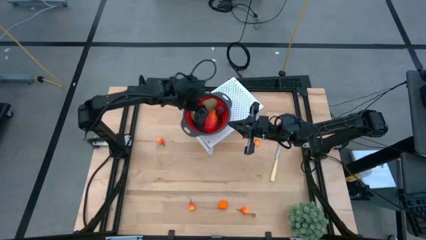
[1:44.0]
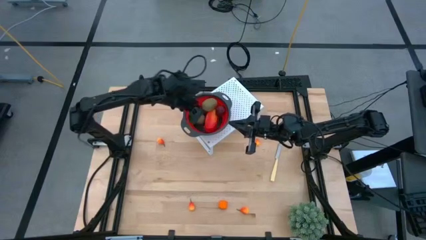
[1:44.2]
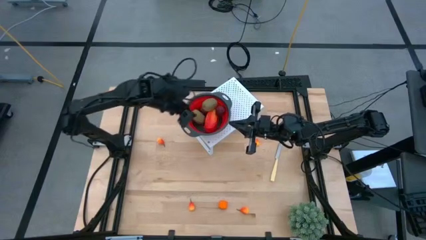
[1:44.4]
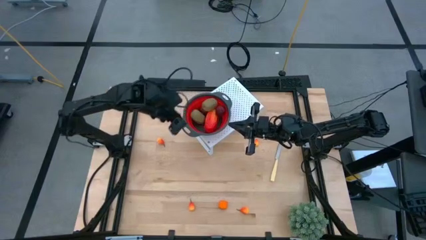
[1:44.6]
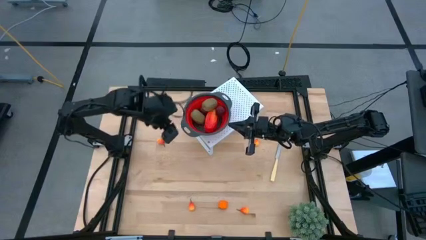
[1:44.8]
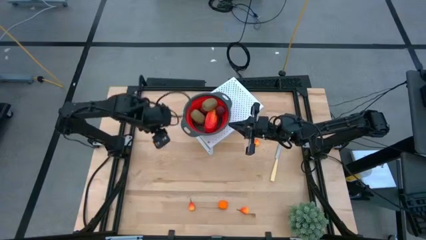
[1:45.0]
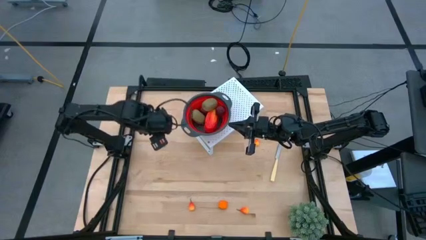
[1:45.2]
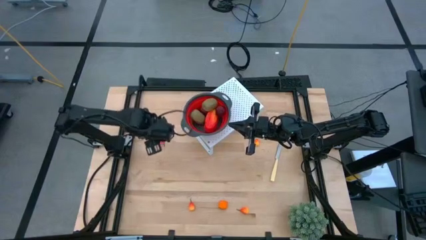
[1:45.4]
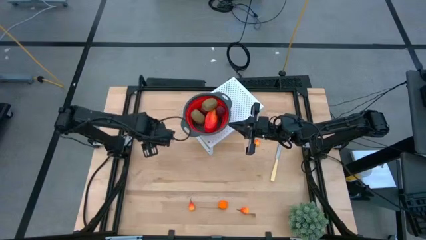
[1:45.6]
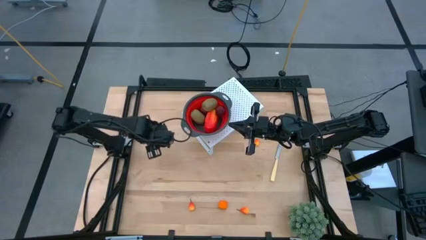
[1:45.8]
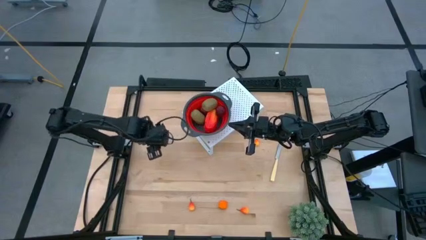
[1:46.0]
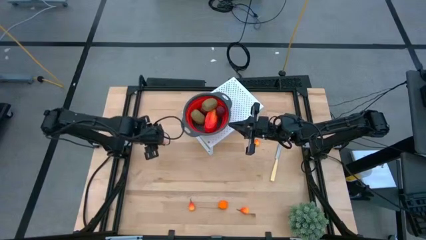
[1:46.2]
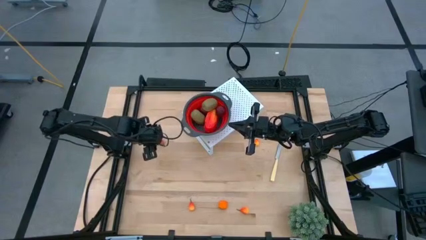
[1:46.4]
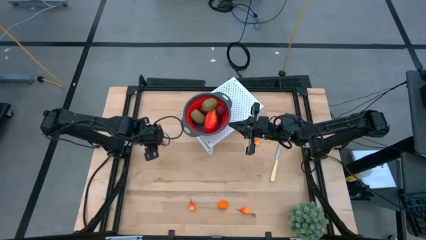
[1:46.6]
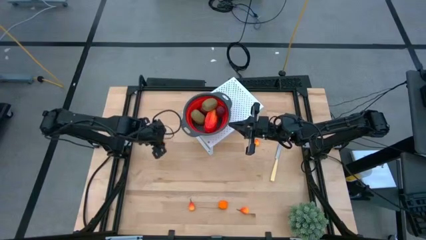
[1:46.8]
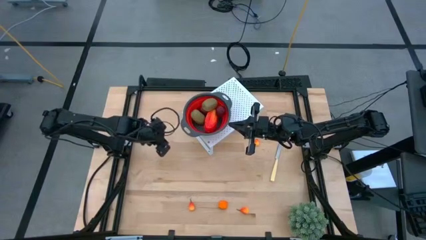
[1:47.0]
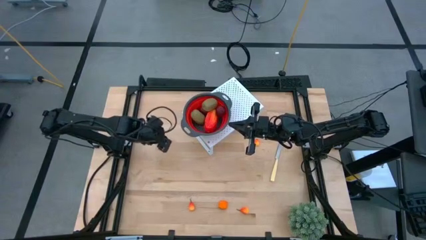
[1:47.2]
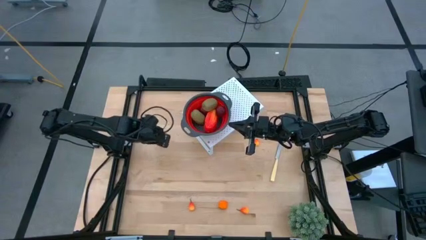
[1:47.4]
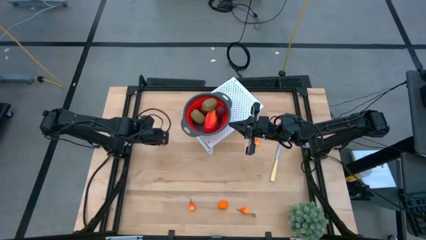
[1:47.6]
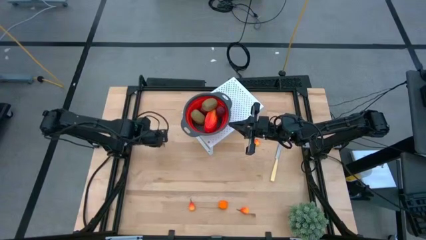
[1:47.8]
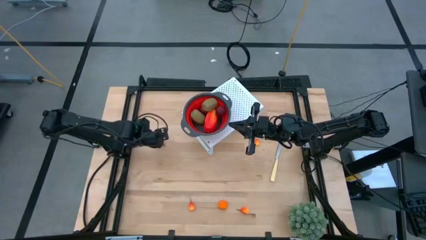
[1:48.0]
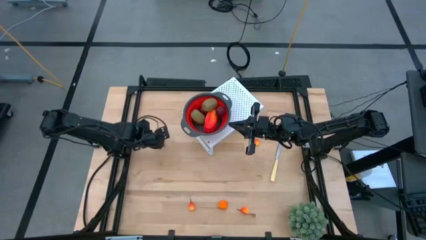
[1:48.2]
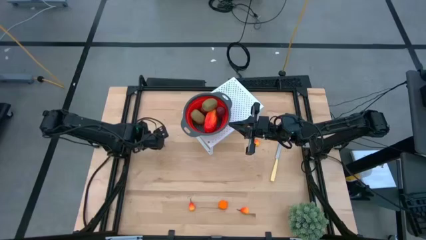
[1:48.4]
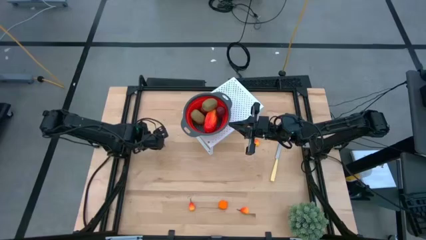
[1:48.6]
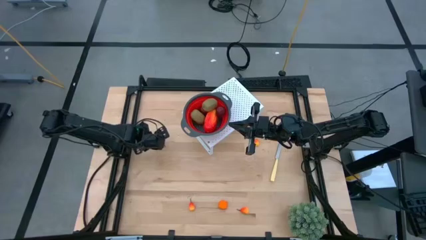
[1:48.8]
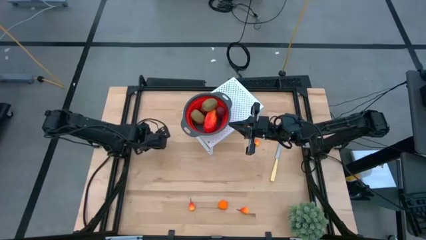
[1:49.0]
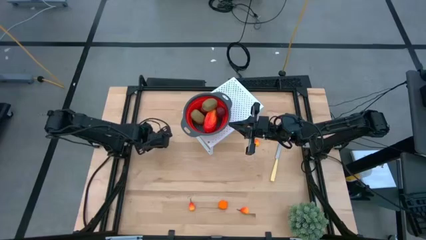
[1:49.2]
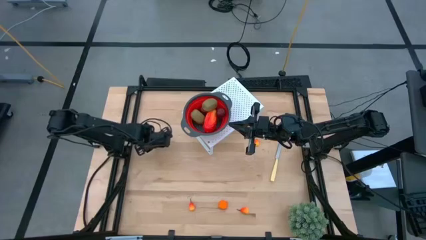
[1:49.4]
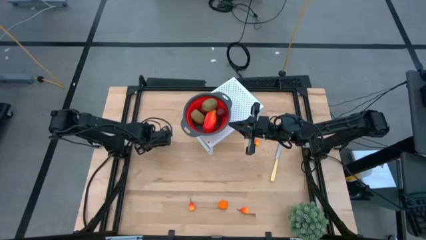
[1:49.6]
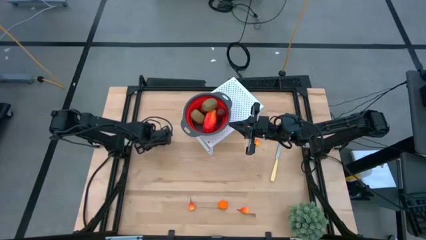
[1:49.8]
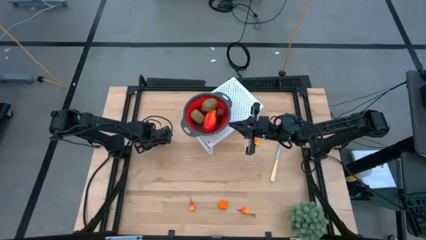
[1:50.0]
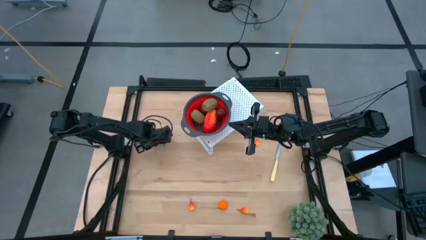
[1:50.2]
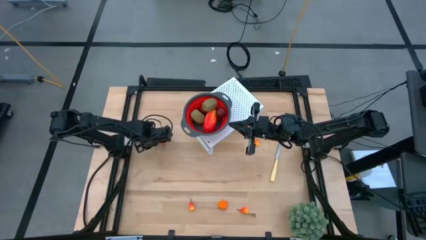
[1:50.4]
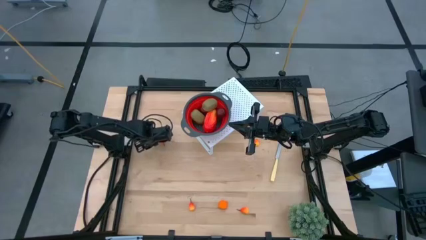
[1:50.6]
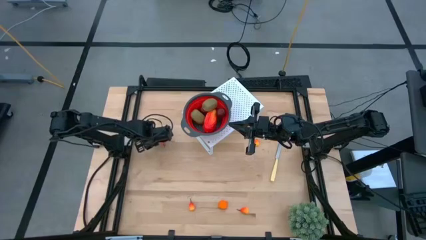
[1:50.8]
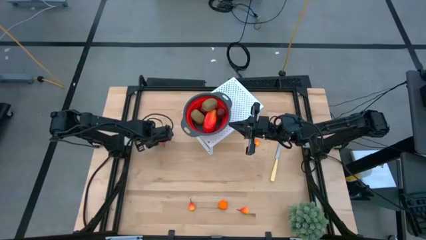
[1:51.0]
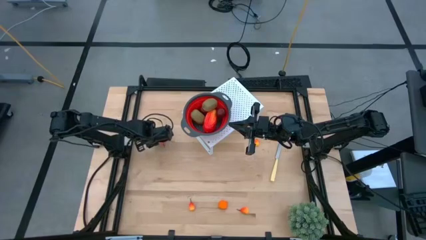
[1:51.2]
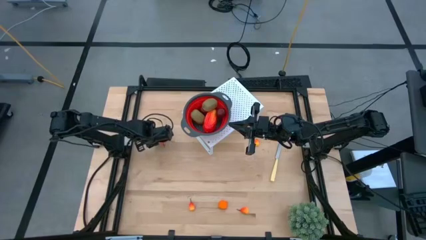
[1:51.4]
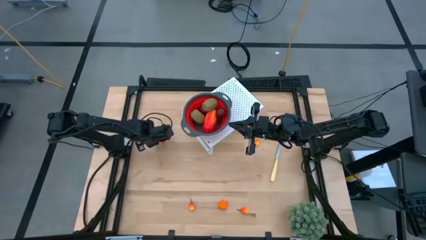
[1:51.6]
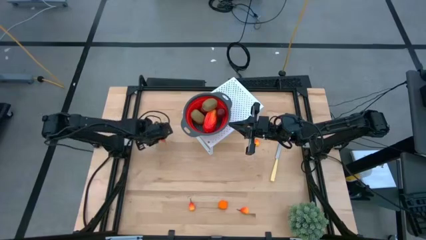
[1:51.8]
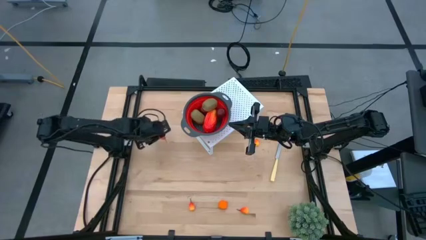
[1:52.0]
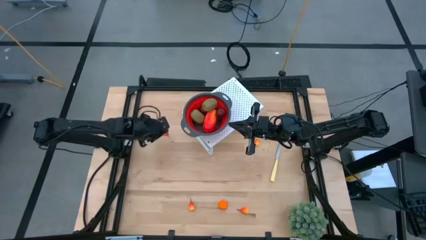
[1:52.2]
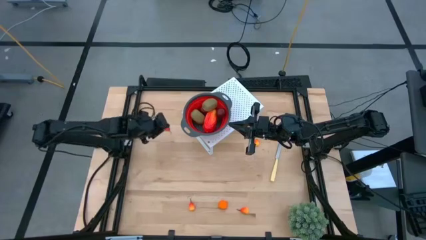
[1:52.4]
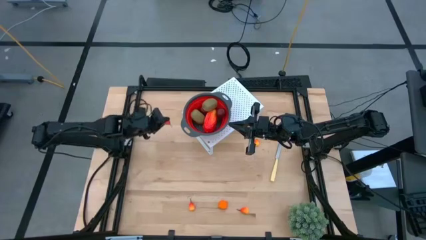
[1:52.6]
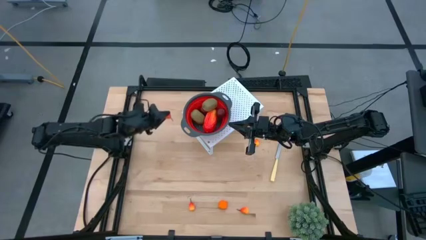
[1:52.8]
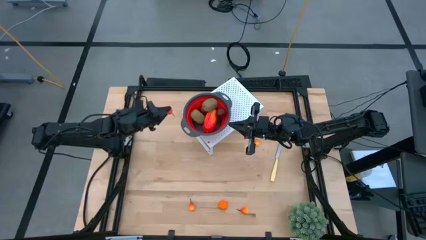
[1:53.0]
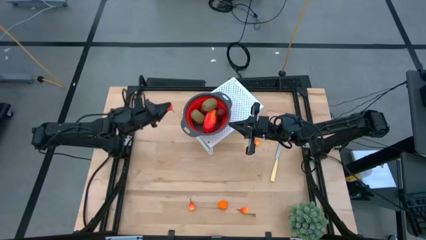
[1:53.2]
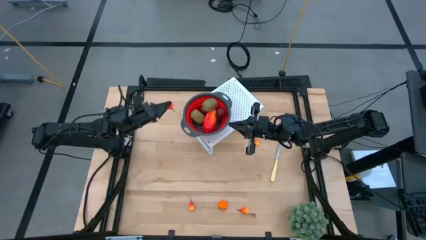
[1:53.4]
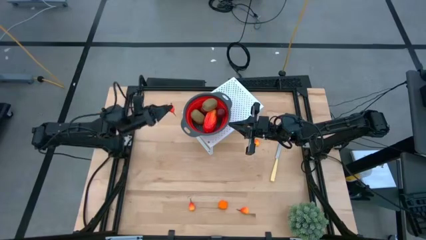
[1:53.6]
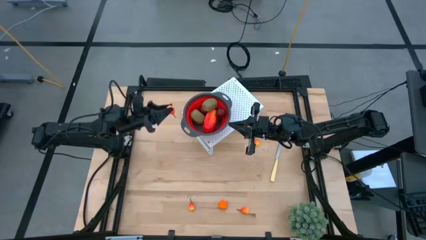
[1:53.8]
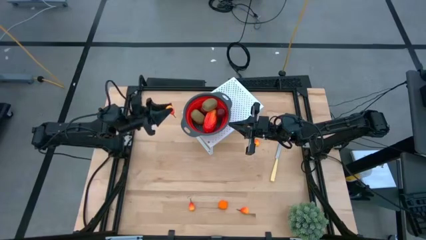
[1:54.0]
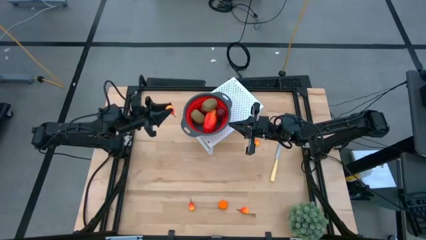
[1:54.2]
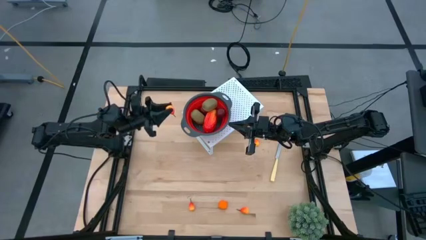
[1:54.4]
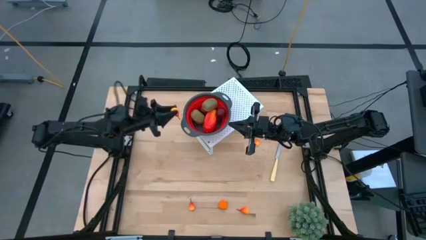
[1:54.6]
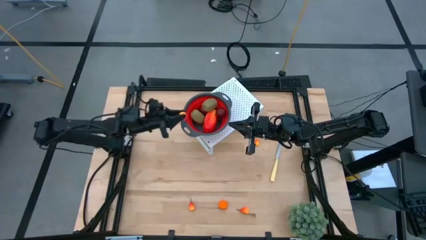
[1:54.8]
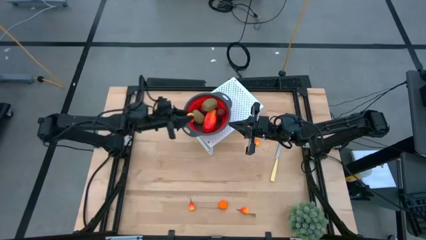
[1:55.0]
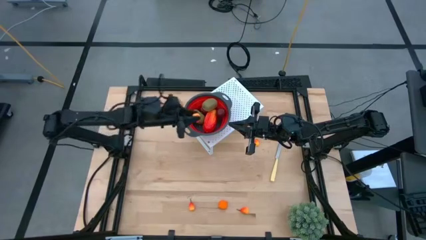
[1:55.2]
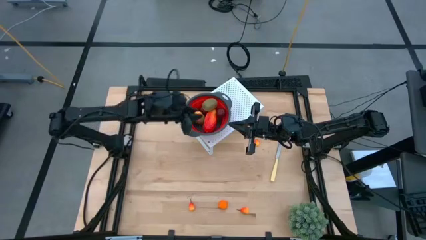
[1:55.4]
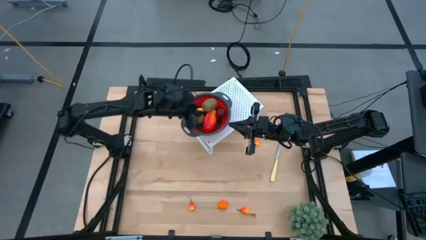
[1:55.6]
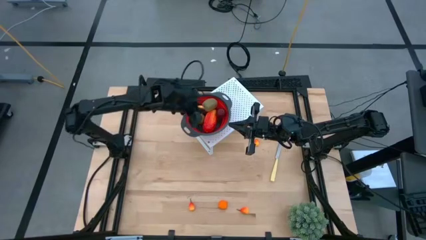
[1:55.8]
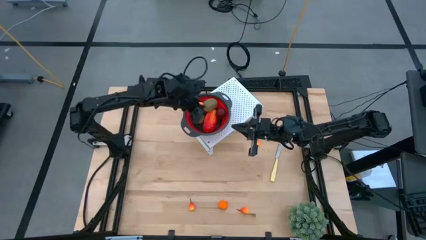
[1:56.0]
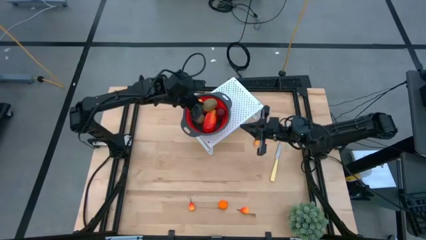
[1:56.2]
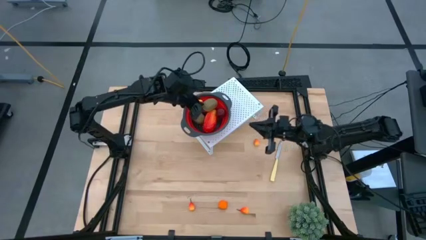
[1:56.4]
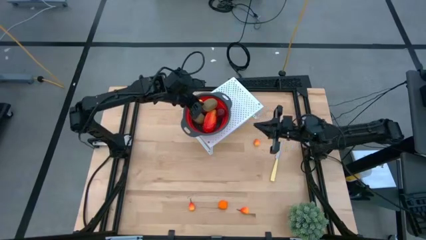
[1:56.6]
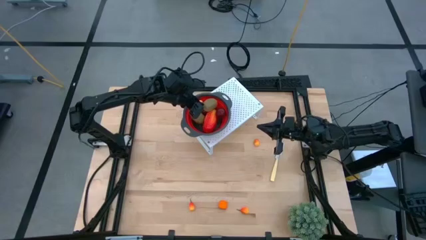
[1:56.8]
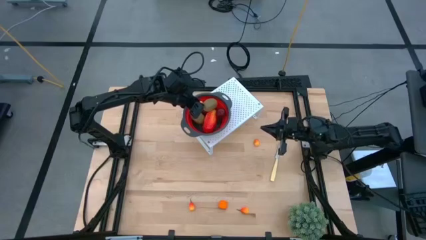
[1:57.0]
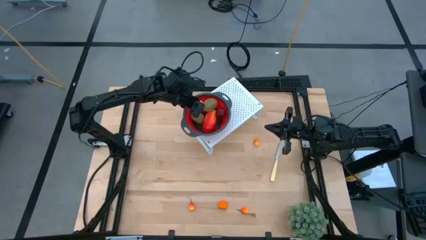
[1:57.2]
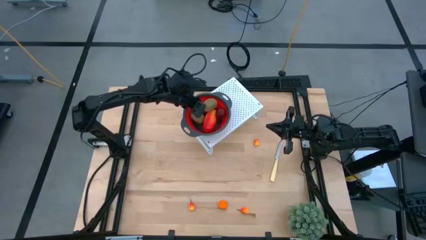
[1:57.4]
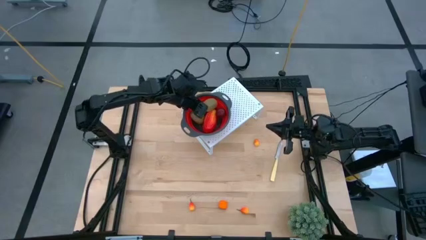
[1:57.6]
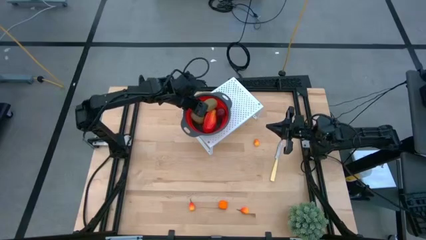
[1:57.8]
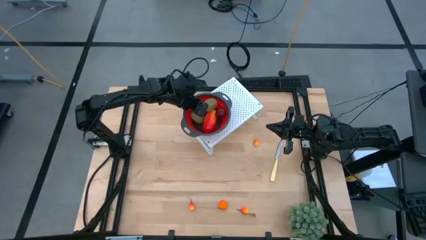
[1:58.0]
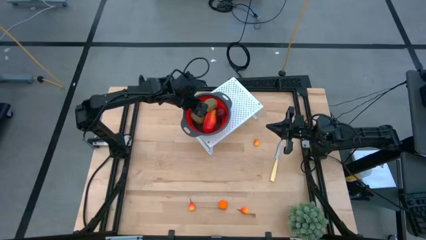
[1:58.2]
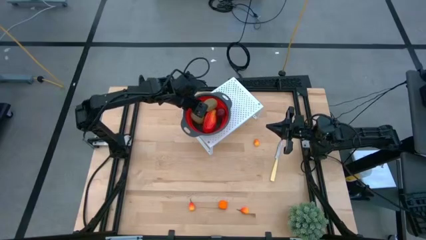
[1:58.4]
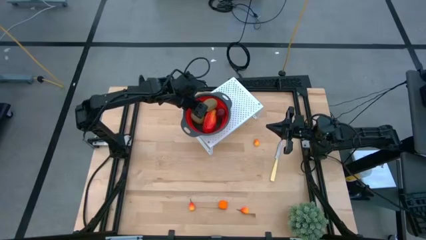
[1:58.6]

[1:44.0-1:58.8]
Task: Pick & Place Fruit
Put the top left peach into the red strainer bowl on the shelf

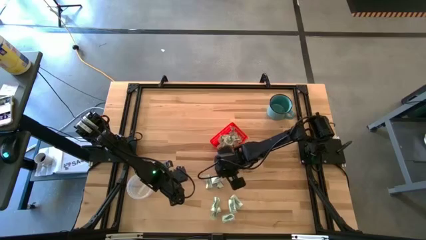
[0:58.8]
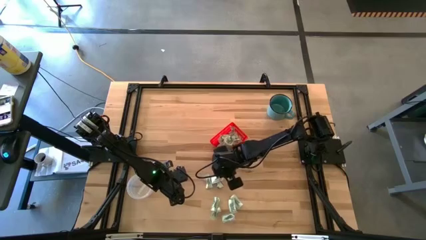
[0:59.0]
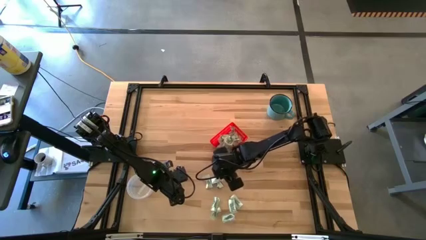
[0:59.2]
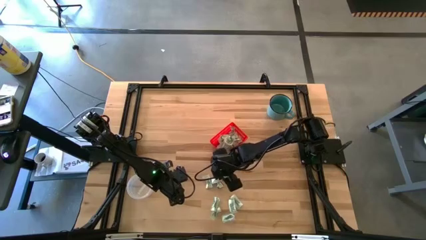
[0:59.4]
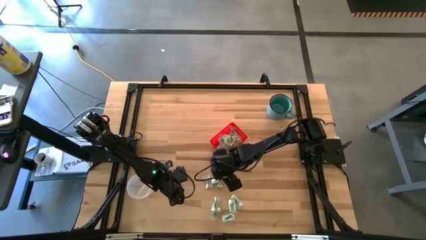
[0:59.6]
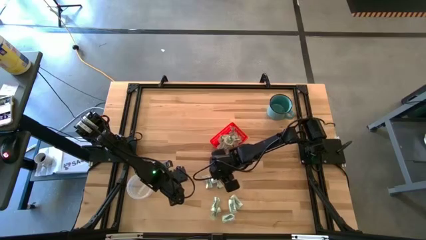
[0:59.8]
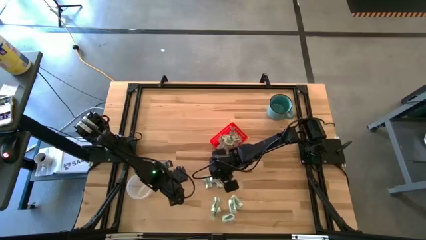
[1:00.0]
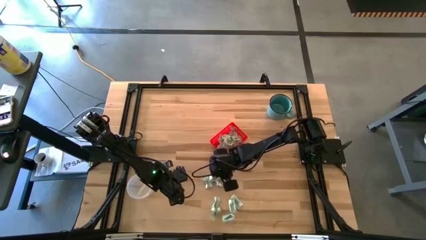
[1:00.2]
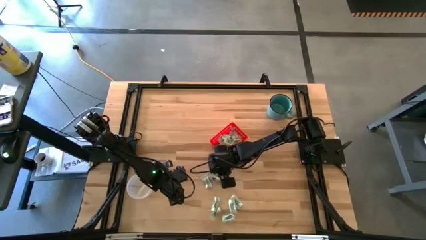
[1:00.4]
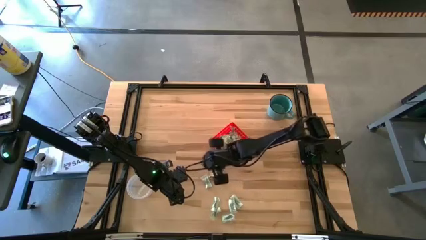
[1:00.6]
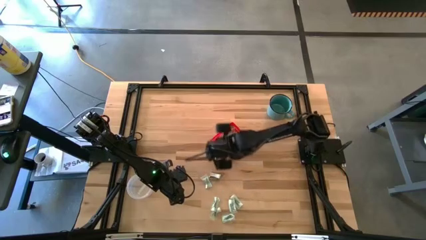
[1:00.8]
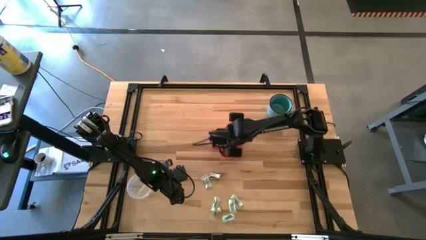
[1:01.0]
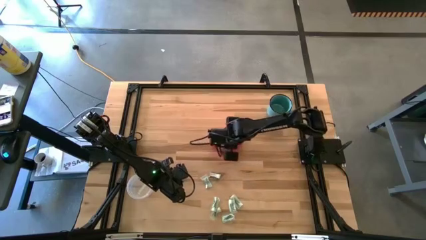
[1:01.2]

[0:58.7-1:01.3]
Task: Pick and place items into bin
Put the stevia packet into the red bin
